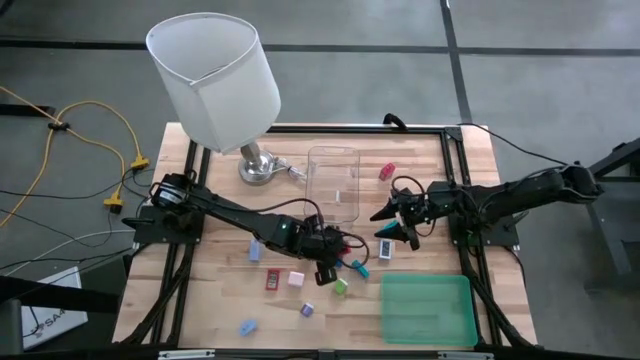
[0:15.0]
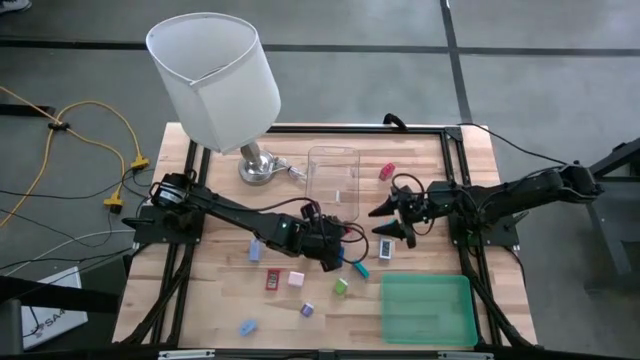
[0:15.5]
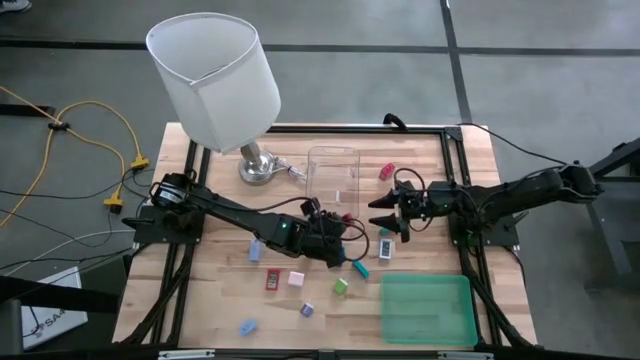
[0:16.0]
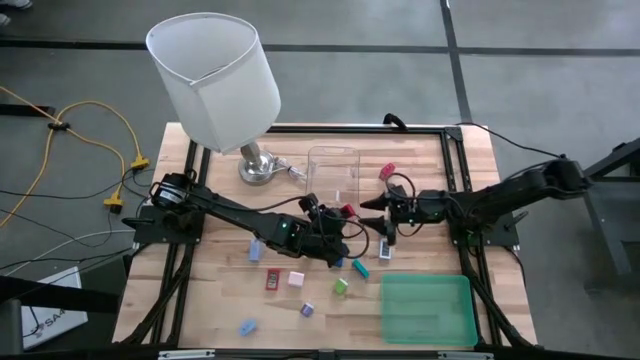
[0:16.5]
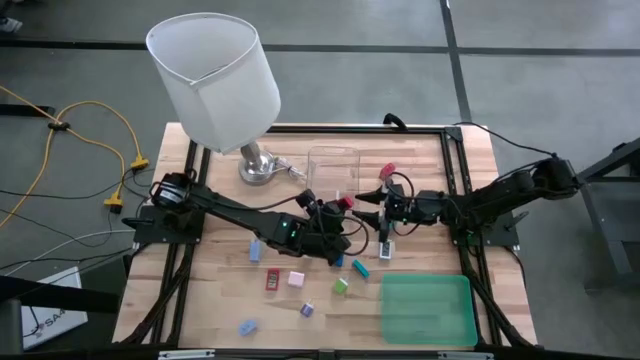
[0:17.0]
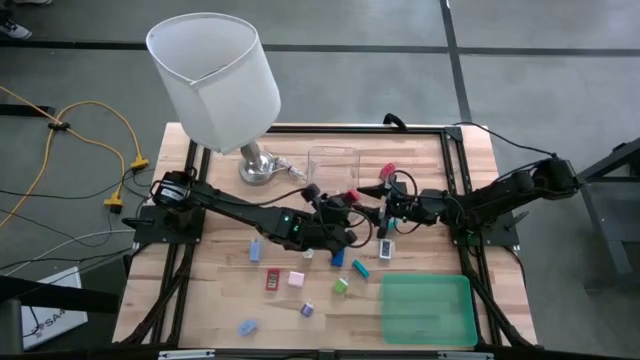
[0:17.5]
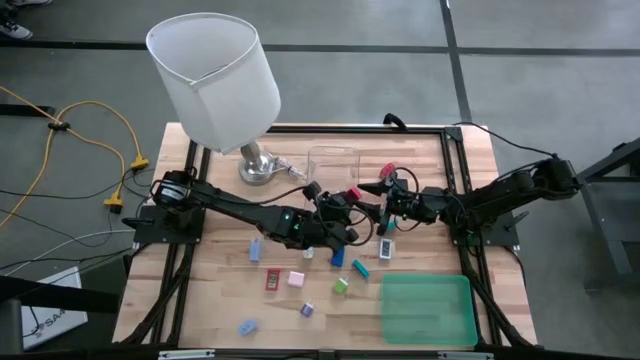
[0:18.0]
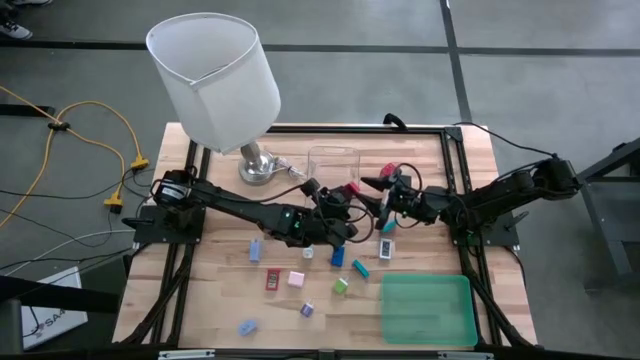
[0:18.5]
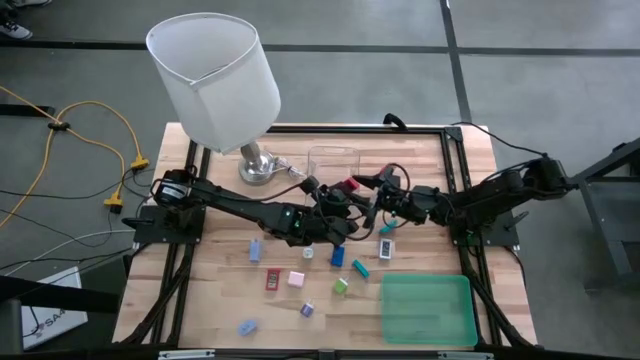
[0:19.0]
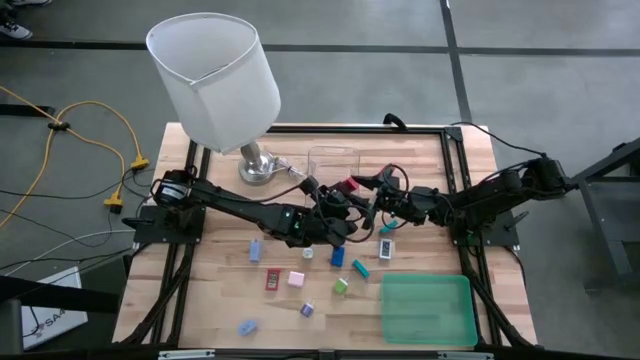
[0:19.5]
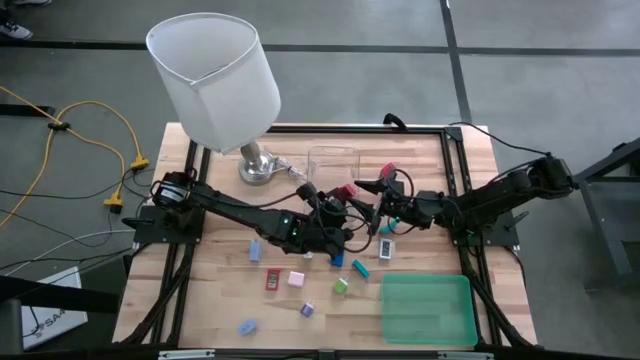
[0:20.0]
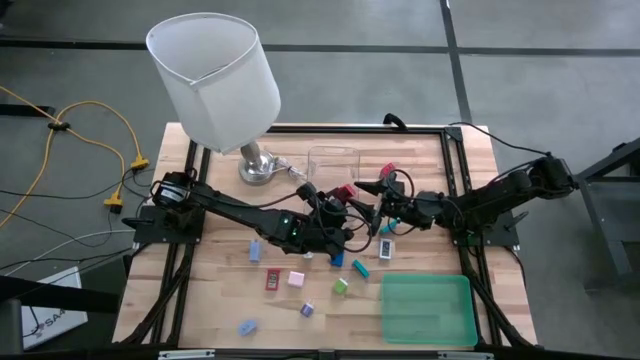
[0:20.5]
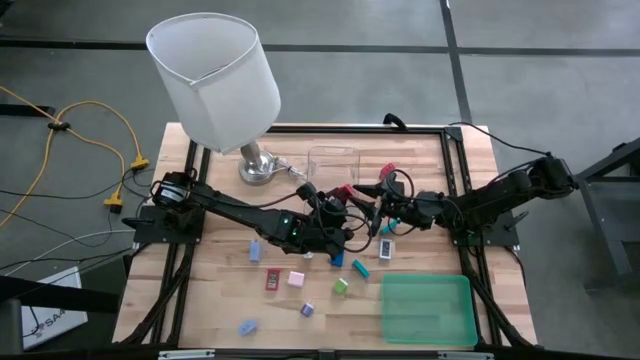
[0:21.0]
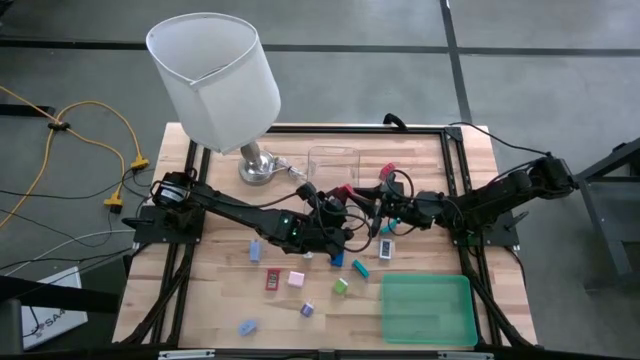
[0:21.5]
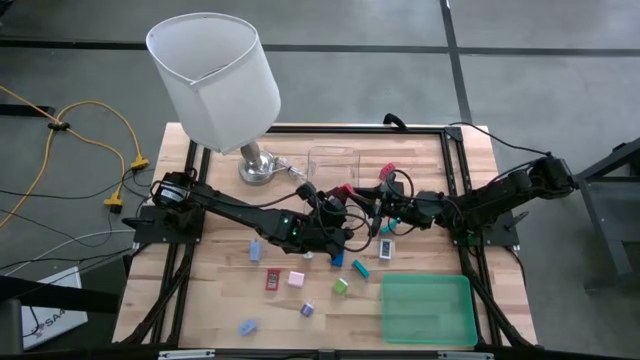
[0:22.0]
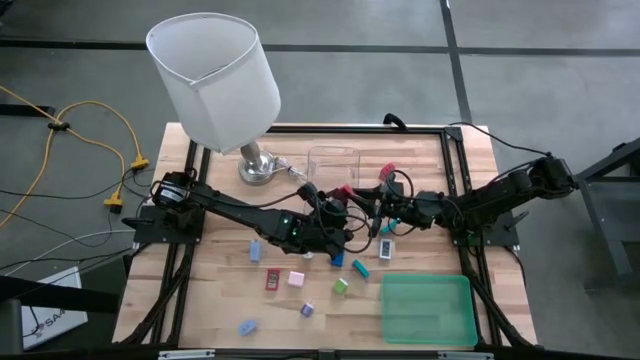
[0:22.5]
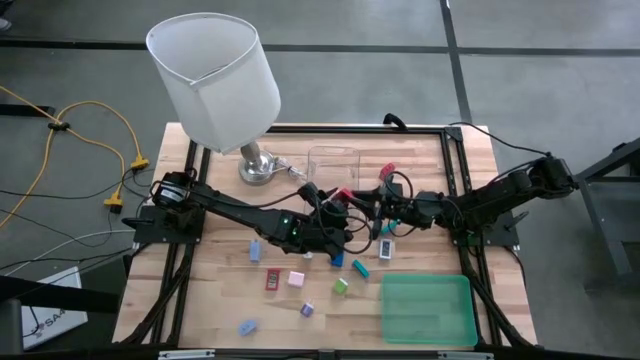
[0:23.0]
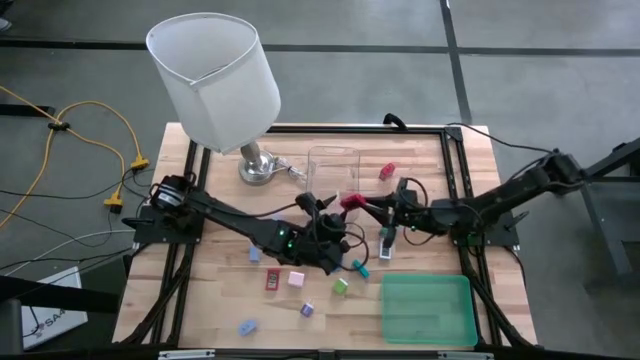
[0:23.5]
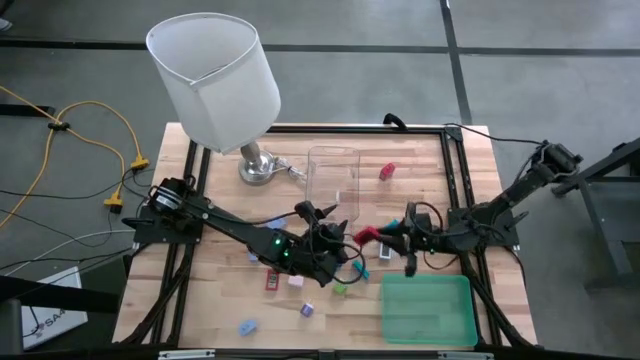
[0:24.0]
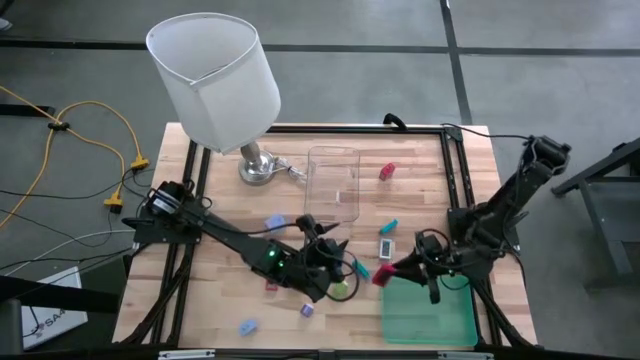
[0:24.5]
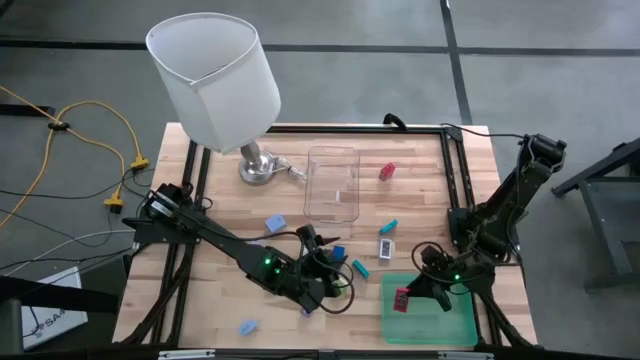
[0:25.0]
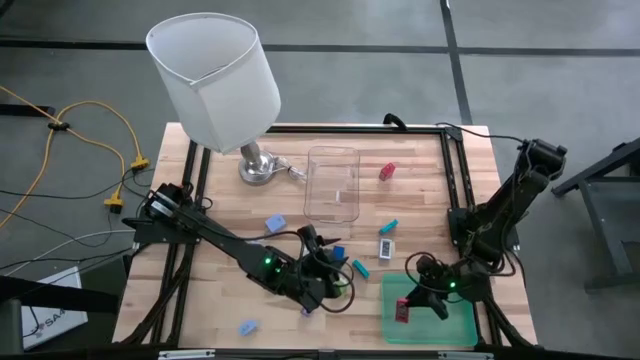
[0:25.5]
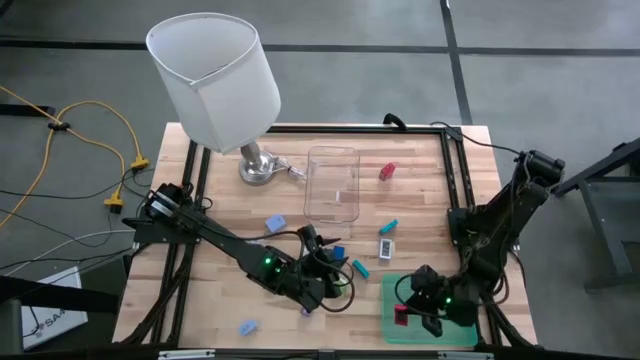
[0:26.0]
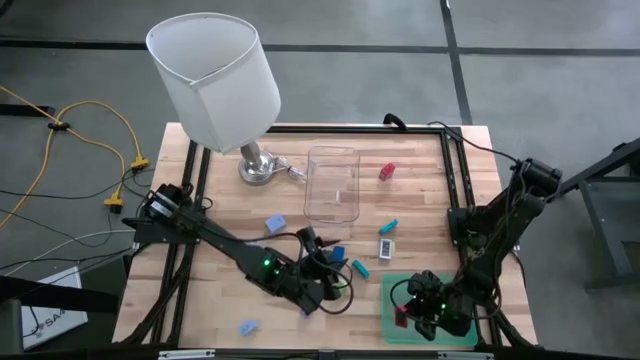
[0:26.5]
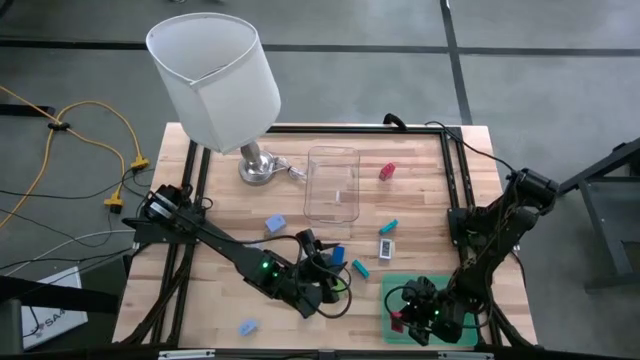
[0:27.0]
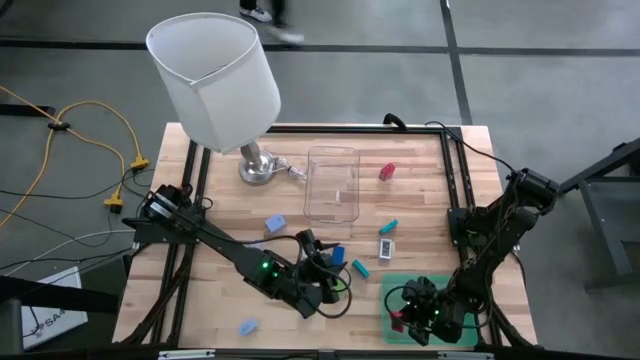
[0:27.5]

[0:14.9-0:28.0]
Task: Pick & Place Office items
Put the left red digital clock into the green bin

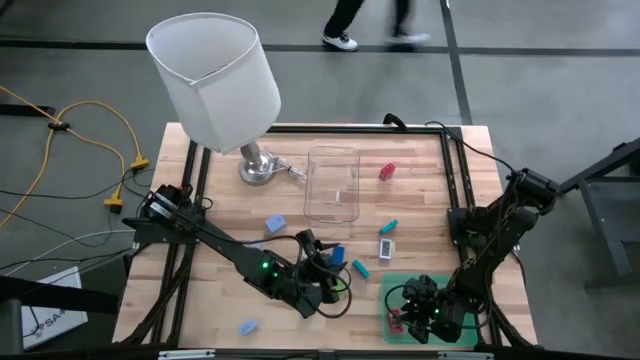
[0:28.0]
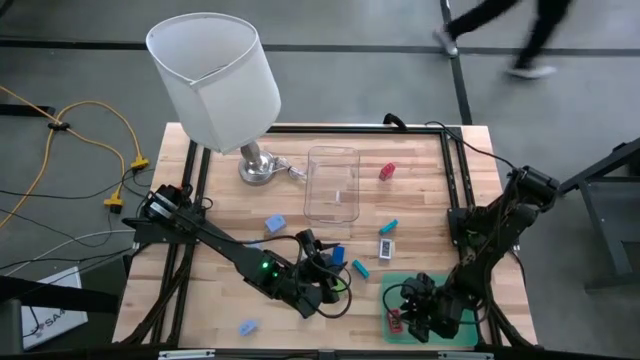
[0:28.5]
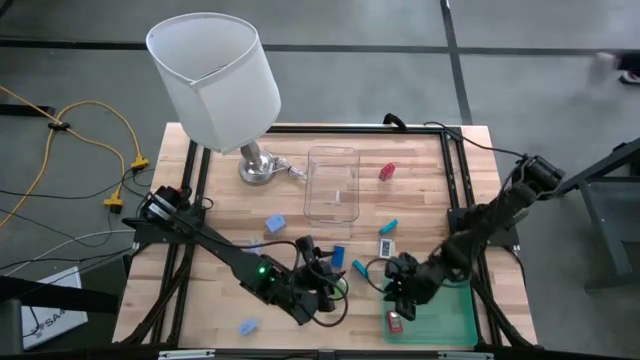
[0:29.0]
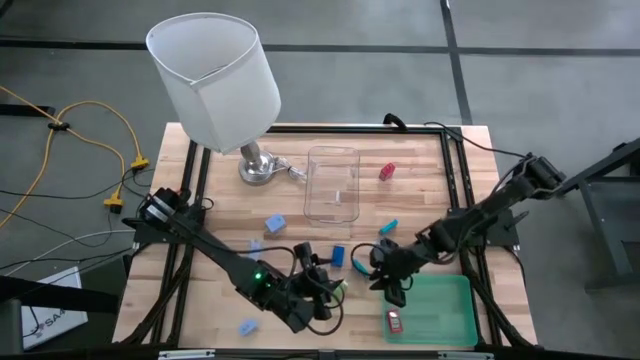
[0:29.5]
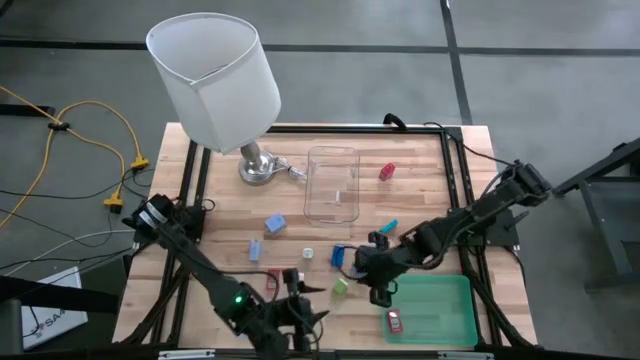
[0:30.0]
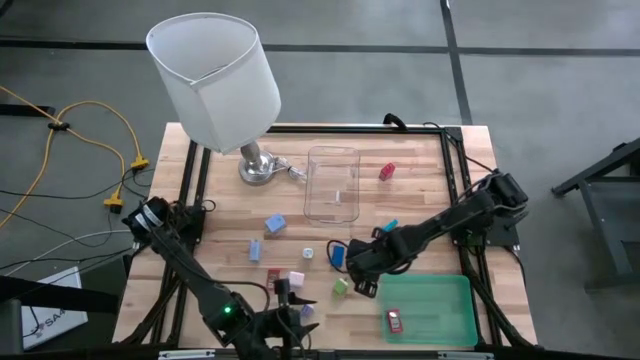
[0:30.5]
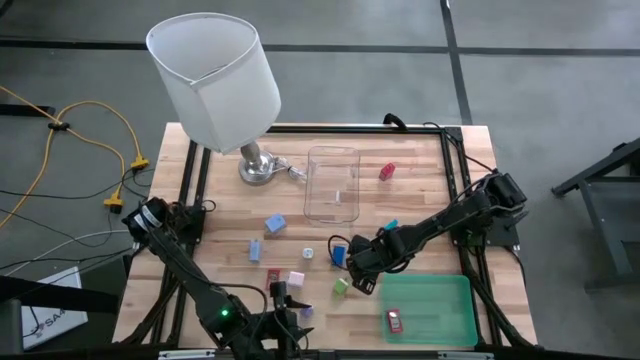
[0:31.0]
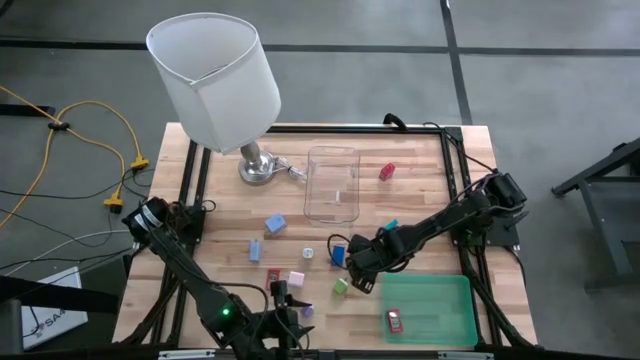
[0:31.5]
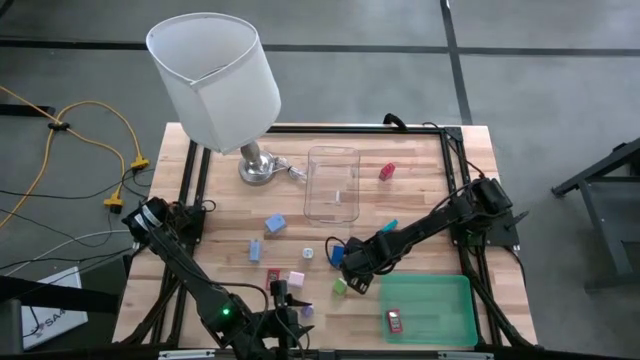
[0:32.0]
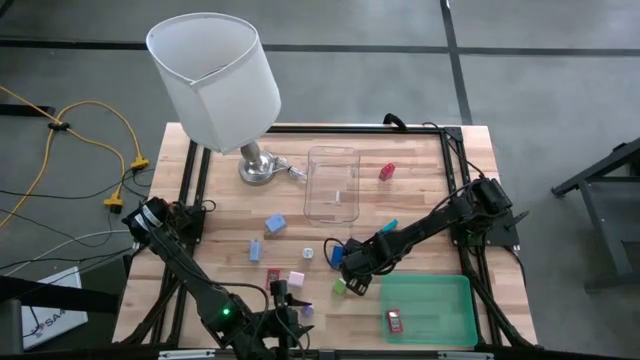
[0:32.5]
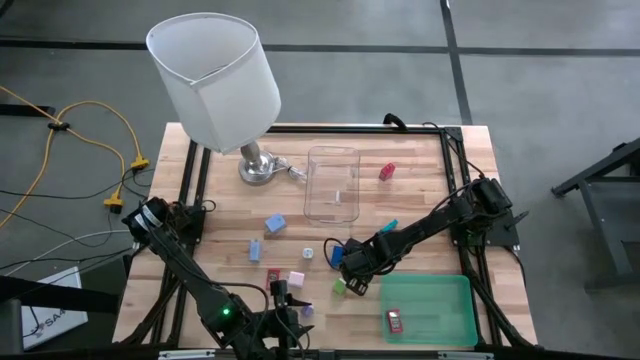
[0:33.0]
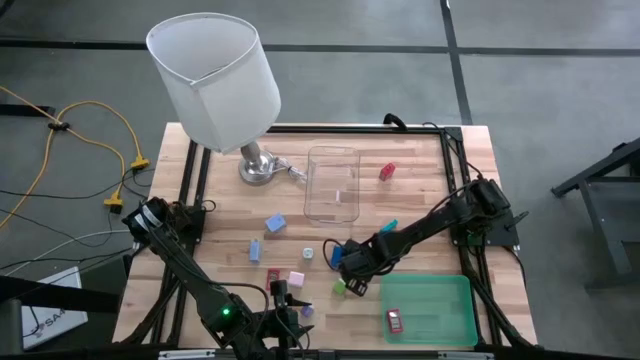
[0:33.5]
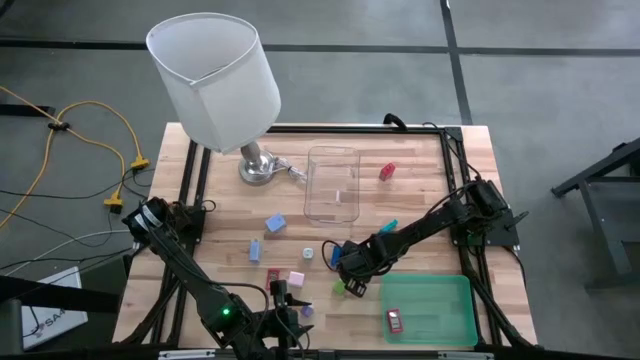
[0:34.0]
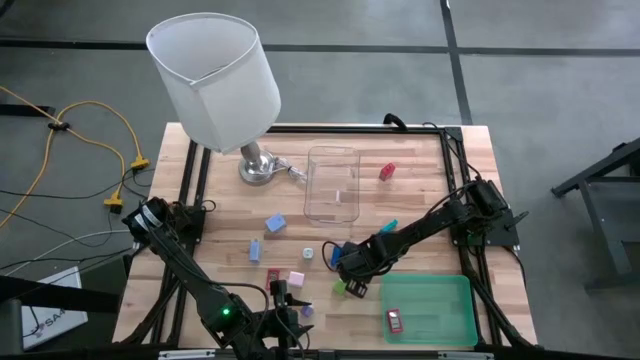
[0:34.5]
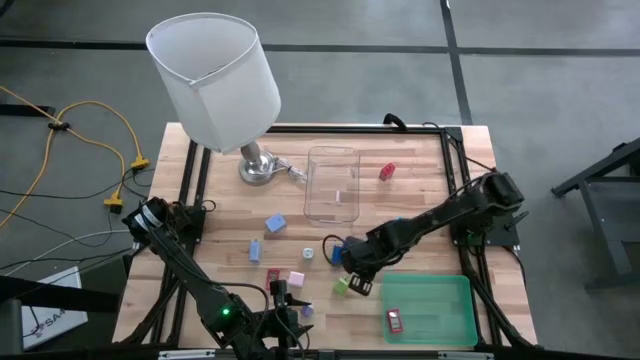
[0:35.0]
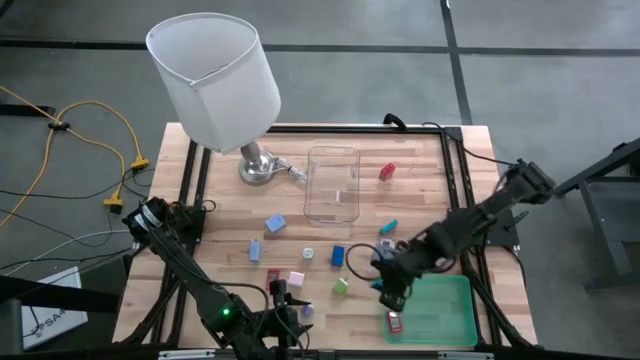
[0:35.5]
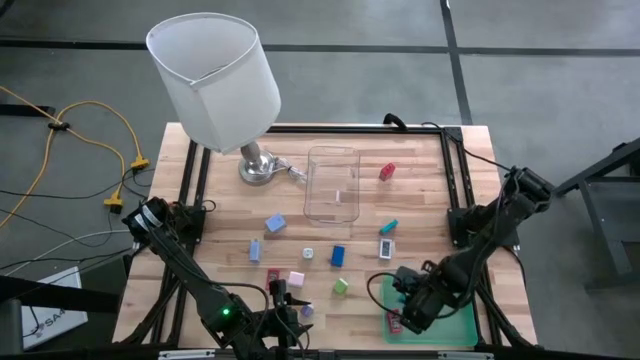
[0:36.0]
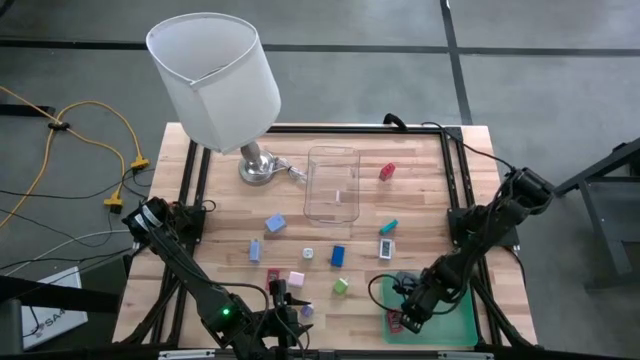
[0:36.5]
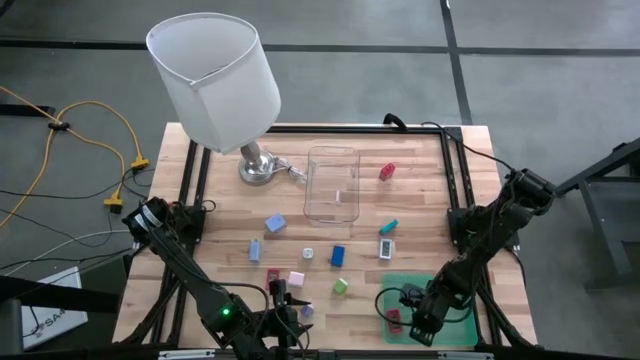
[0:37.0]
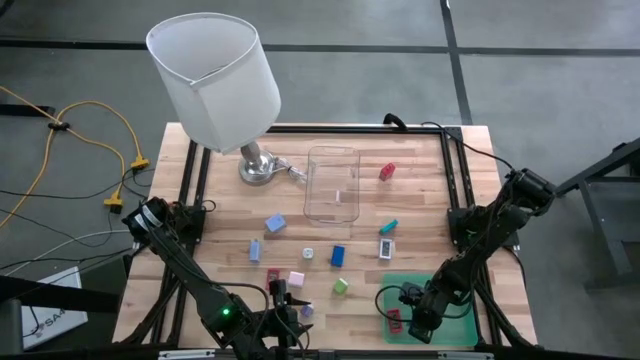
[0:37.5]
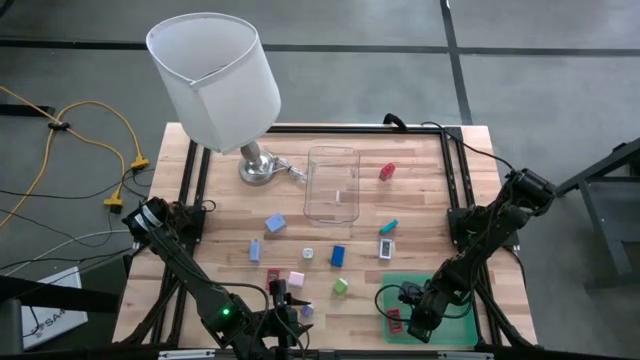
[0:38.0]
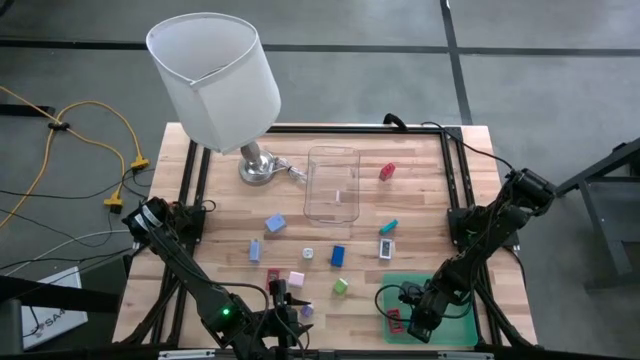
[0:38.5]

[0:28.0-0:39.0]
Put the bottom light blue digital clock into the green bin
